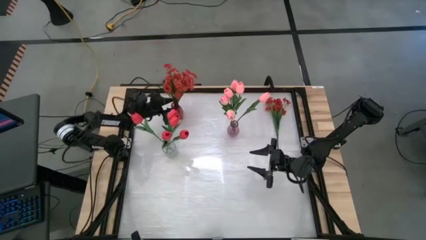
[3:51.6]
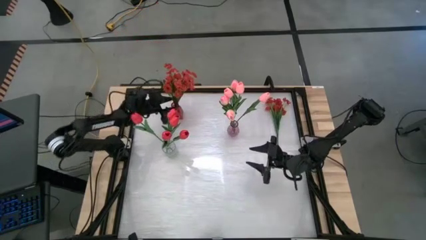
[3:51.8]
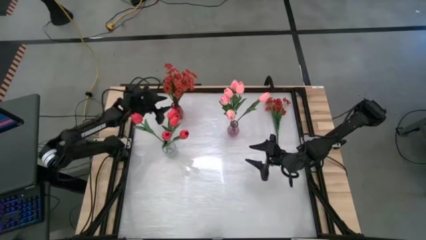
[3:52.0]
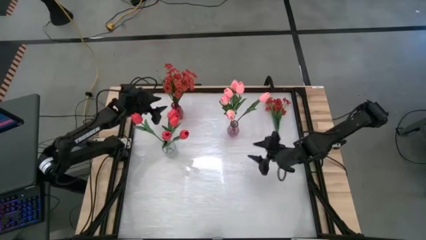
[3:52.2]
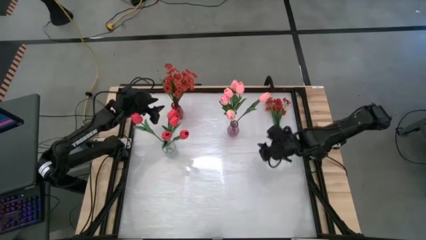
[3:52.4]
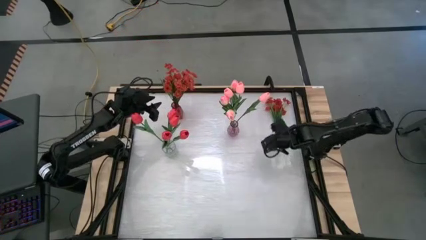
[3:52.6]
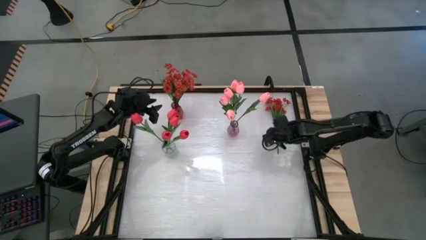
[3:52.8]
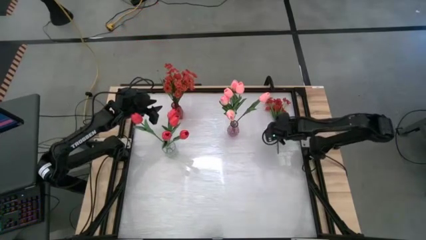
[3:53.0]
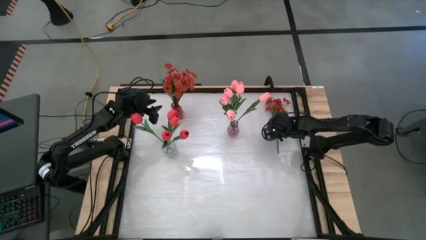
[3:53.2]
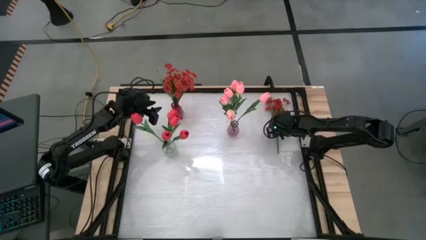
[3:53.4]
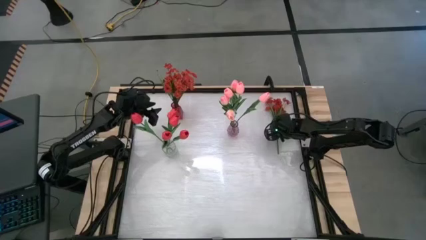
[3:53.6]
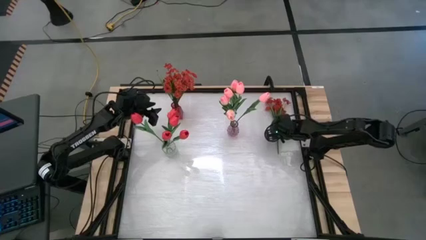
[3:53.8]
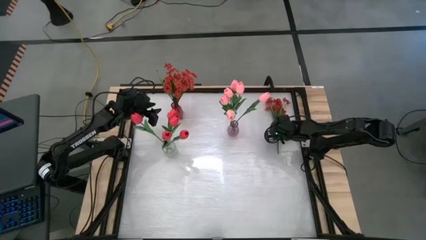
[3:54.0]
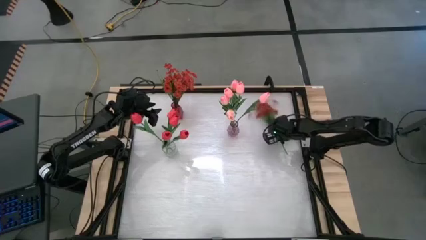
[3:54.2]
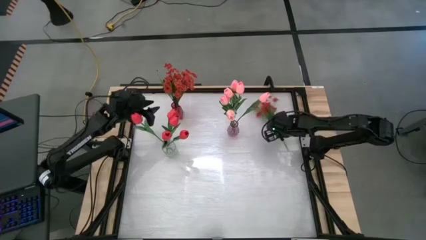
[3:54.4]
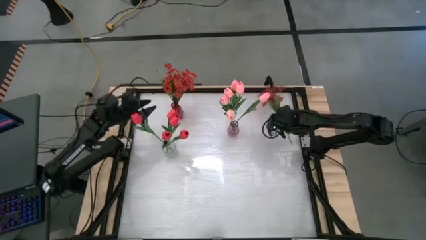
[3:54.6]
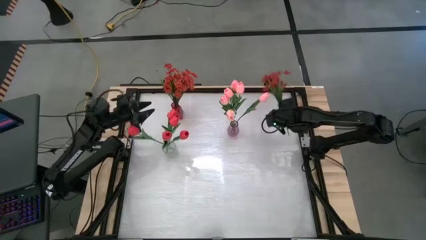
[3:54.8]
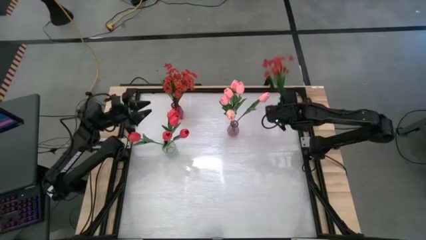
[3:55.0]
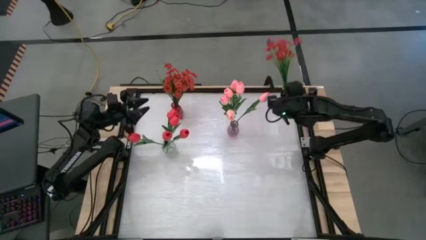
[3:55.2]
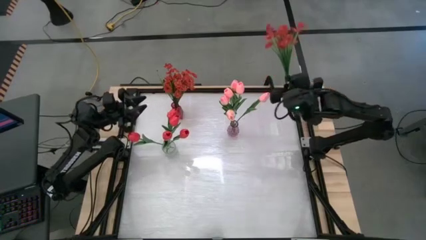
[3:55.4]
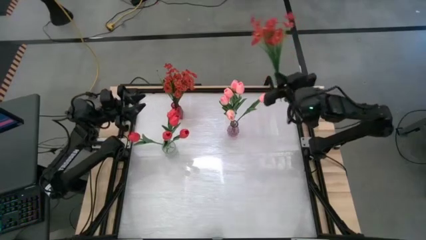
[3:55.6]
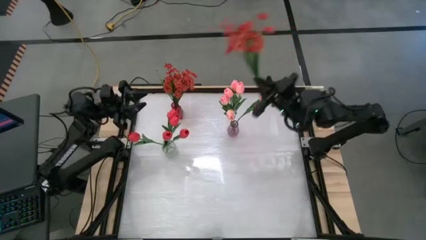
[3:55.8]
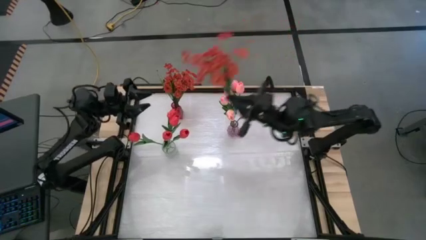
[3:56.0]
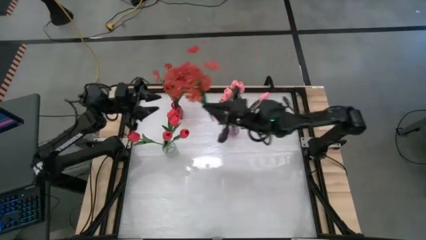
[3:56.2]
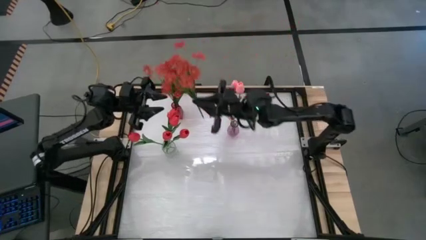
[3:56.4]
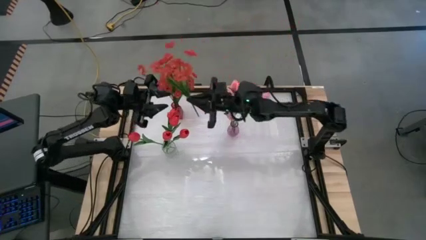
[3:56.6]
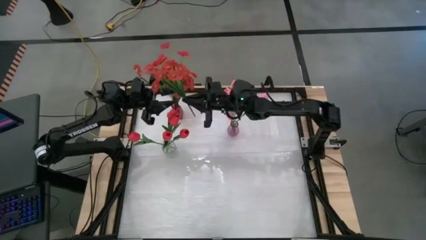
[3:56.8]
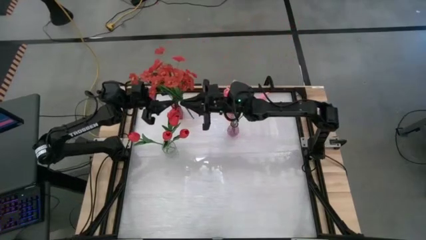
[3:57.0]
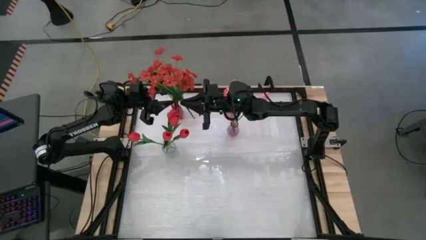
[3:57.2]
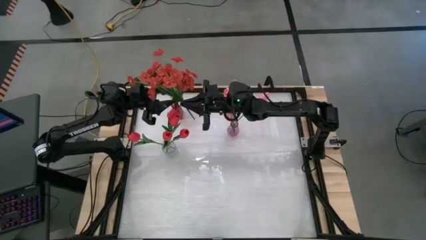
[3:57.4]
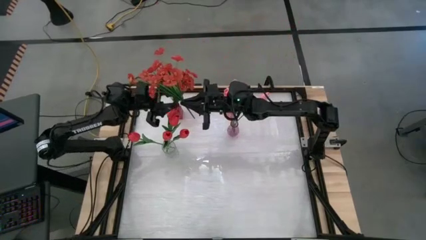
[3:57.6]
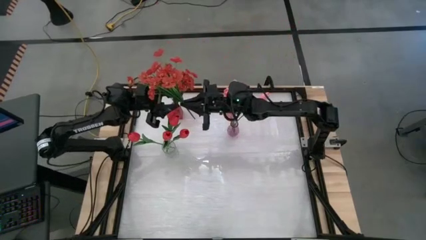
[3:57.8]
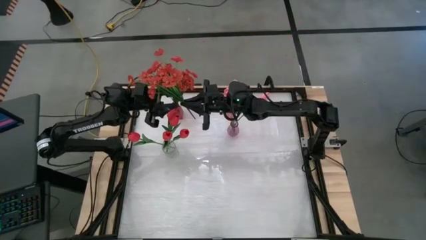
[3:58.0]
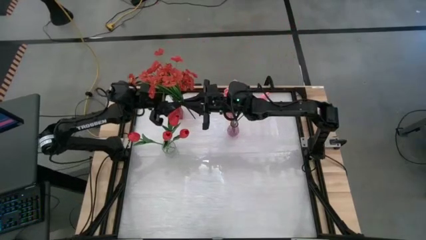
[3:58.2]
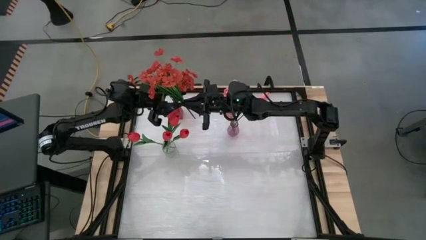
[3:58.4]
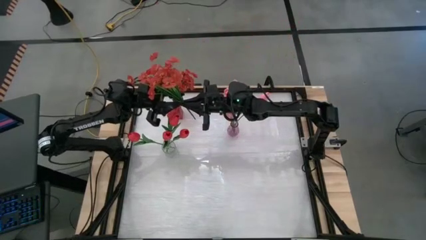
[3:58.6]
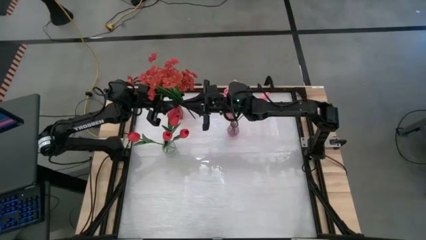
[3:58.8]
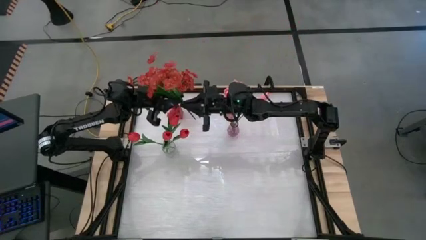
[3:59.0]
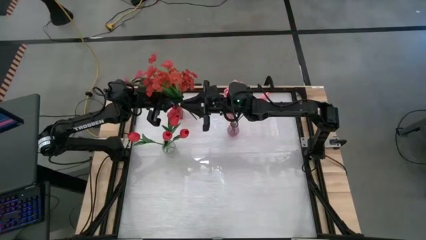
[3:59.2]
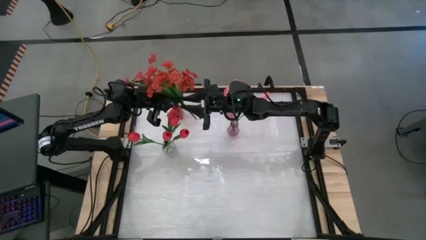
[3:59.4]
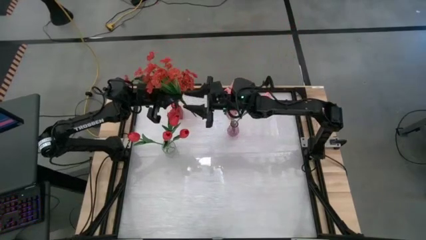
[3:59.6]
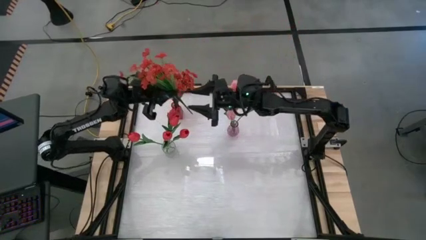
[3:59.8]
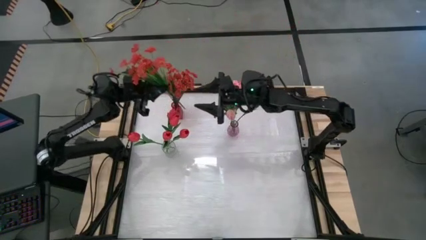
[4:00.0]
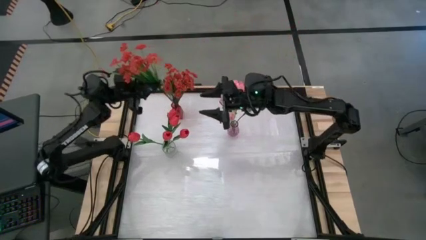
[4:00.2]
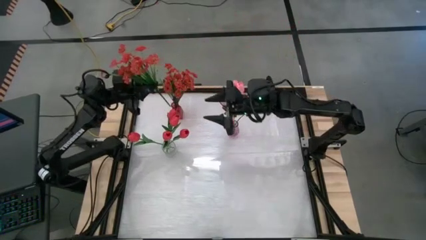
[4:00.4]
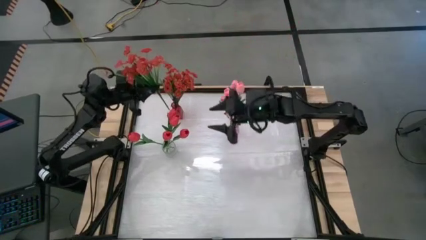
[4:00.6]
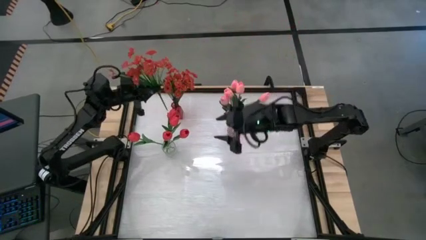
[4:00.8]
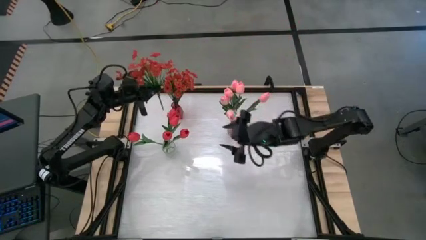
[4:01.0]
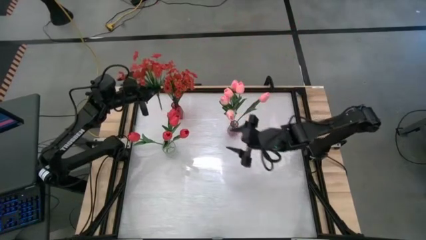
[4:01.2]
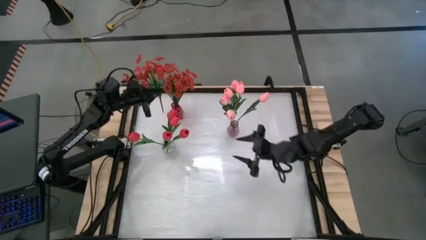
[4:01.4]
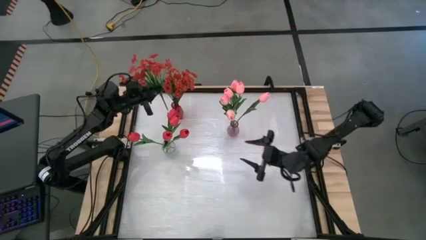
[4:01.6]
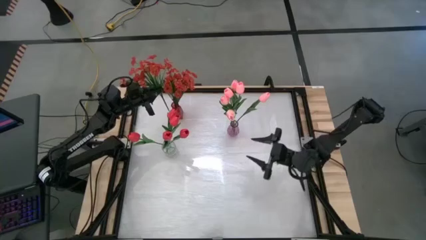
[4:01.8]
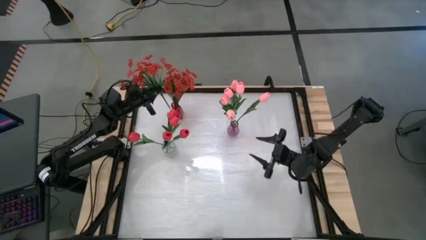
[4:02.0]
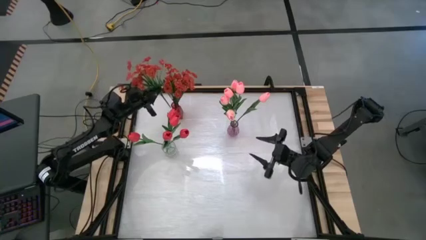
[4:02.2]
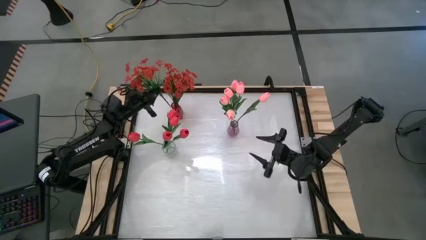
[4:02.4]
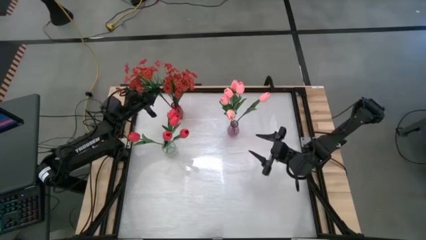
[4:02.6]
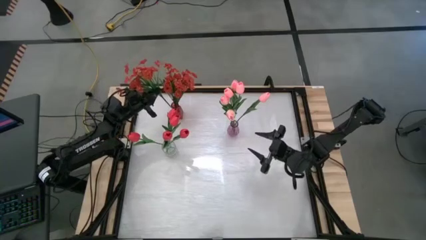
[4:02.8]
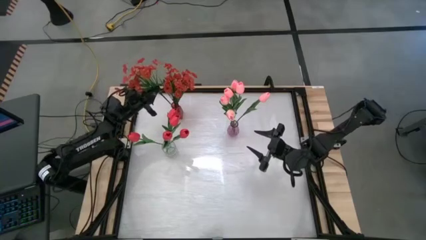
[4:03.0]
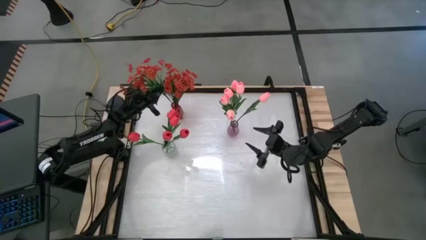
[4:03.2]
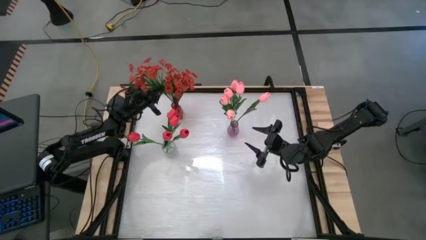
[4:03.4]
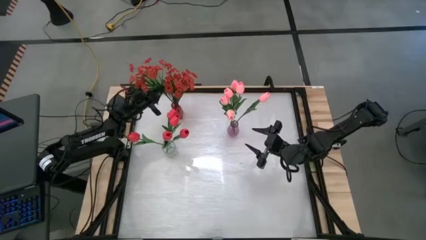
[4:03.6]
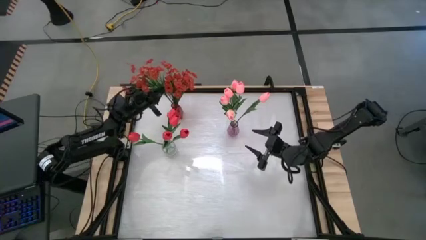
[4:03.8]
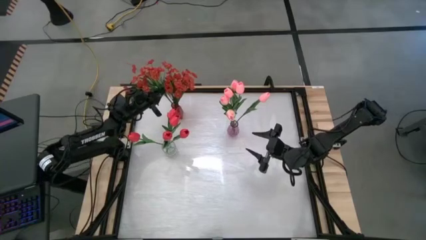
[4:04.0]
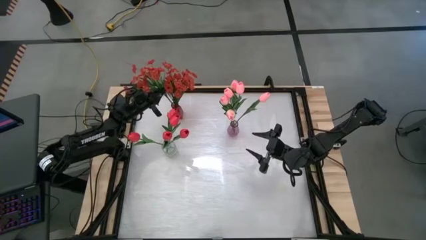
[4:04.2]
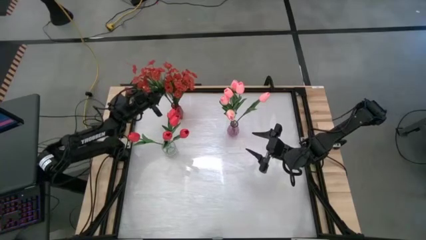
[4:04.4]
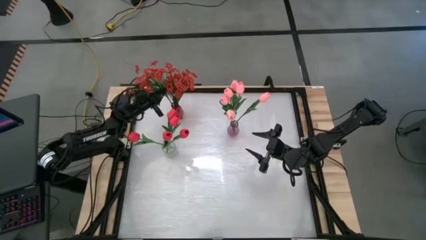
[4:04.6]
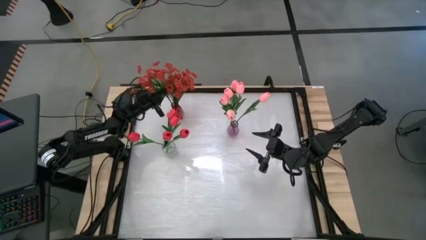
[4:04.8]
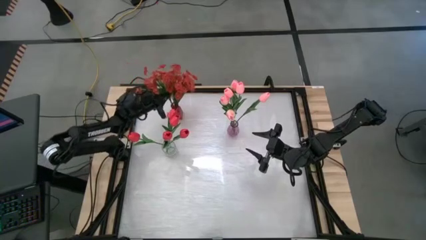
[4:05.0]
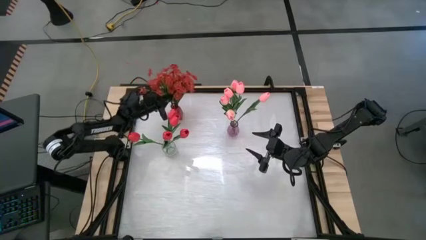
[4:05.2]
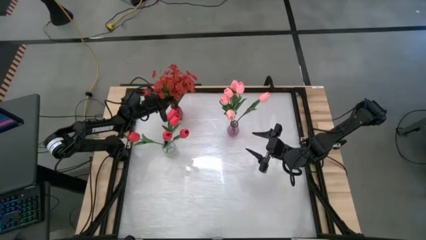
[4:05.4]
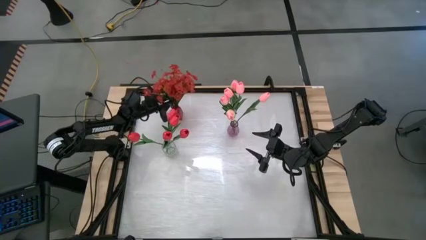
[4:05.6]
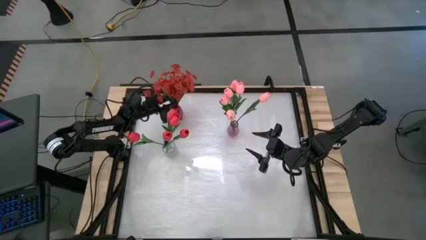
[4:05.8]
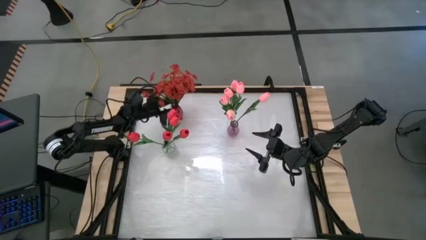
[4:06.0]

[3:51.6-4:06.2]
Task: Sort flowers into vase by color
Put the red flowers into the red vase

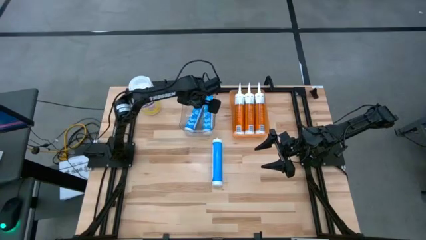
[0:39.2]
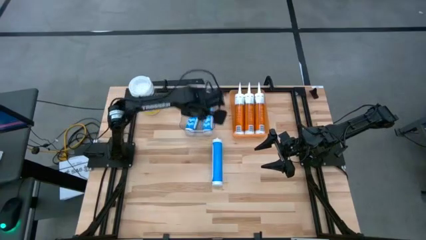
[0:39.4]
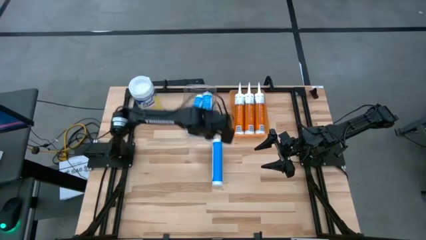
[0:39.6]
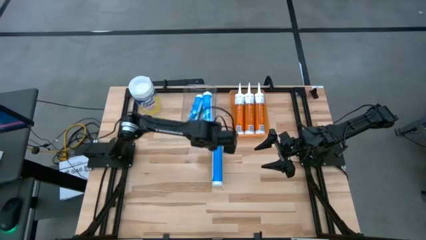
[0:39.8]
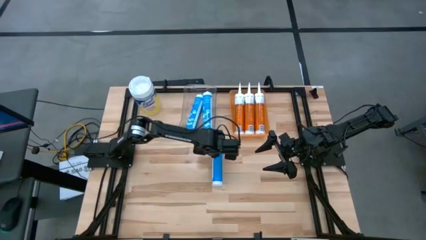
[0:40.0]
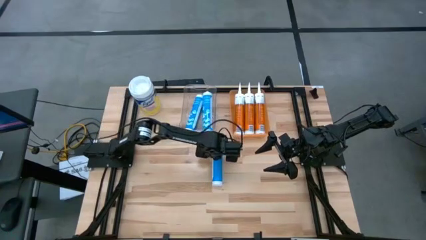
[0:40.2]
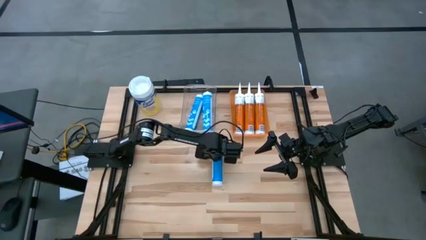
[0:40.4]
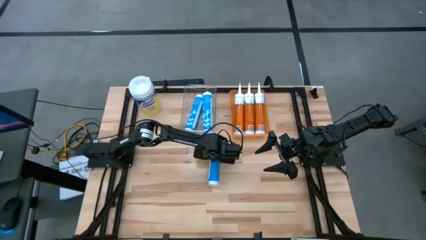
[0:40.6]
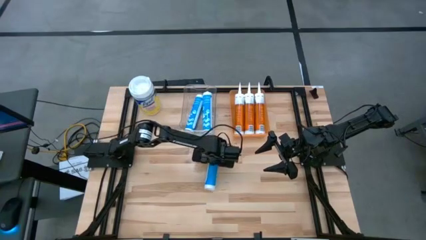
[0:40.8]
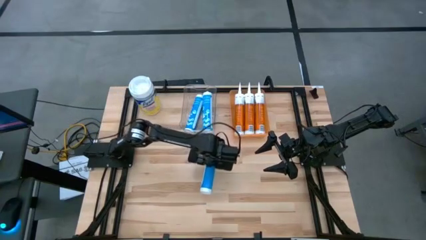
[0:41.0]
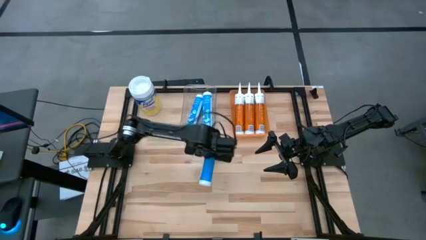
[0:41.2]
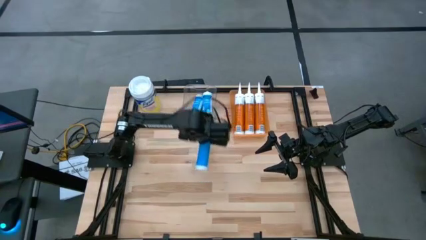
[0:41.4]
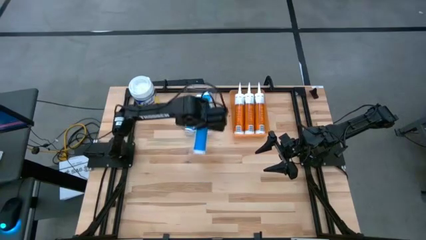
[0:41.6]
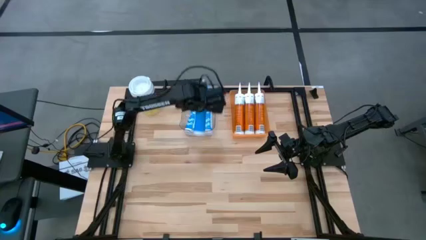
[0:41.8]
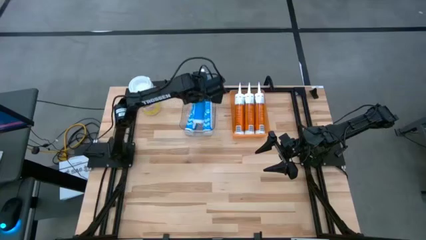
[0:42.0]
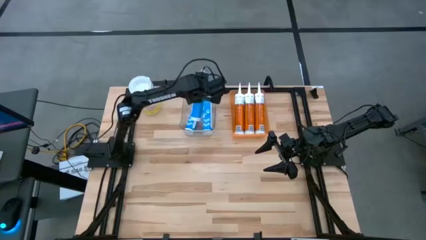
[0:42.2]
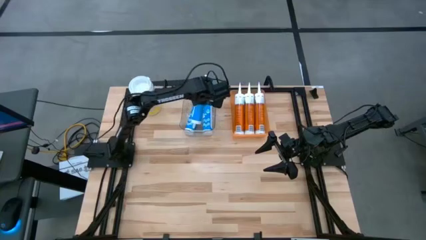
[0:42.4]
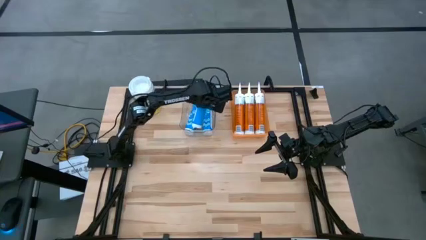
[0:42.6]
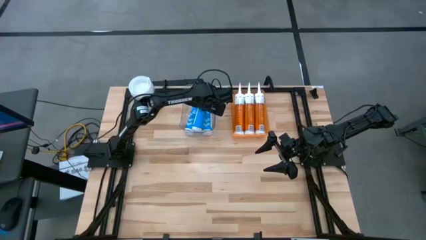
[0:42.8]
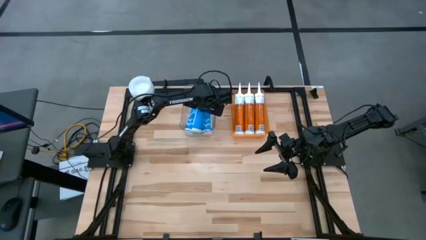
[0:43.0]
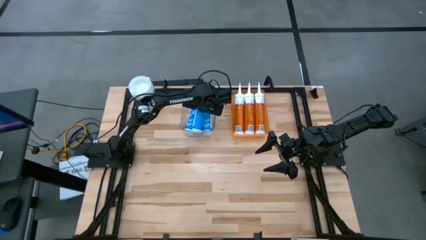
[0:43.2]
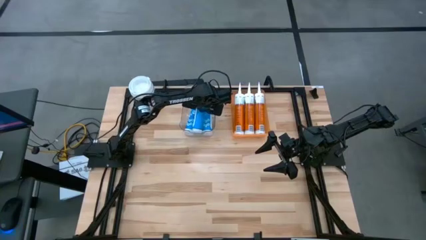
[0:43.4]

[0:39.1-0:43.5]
Task: Pick & place silicon tubes, Sealant and Lysol wipes
Put the blue sealant into the transparent bin
